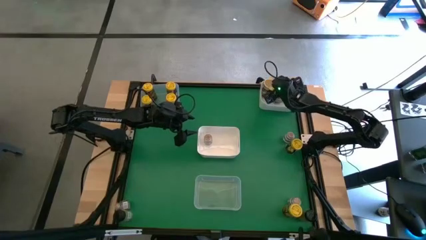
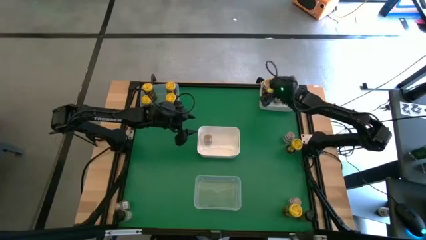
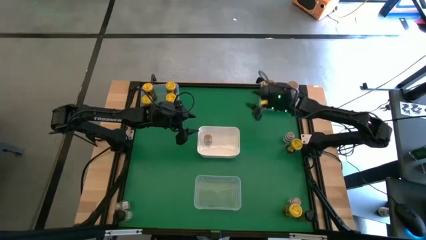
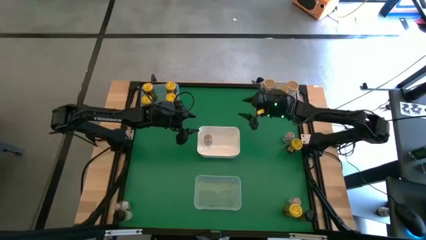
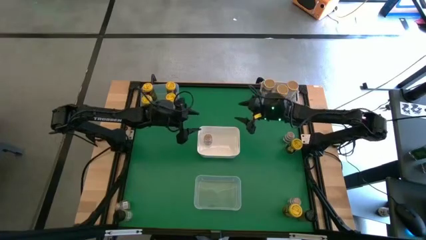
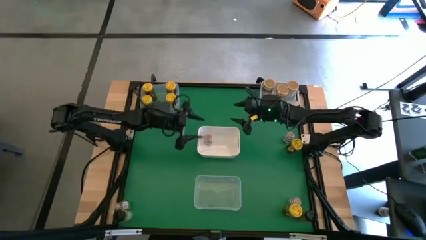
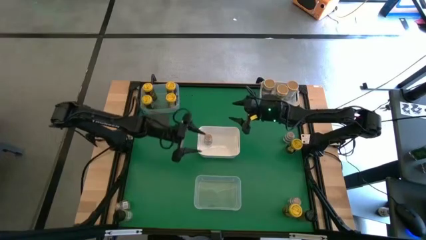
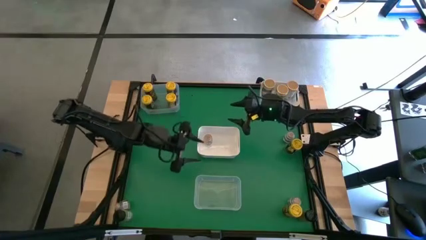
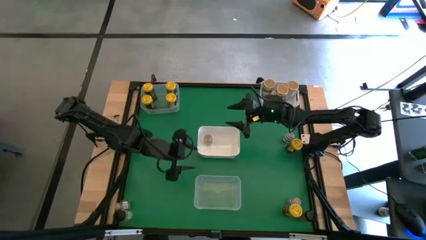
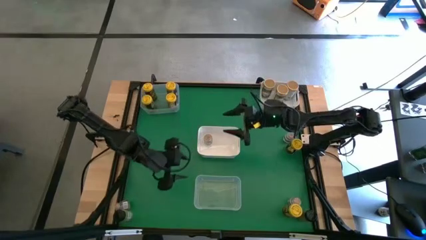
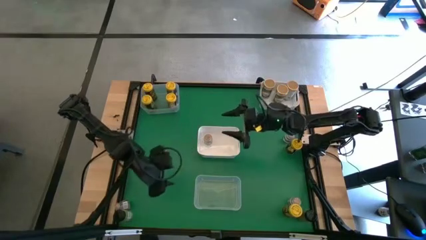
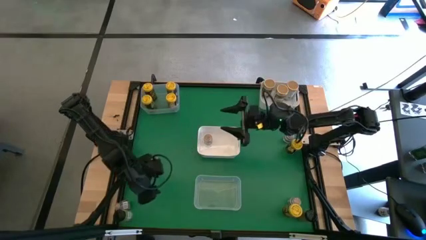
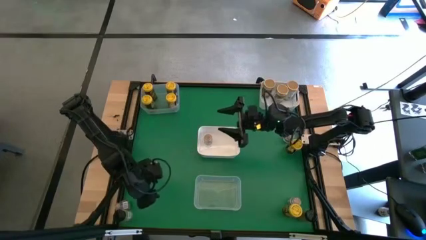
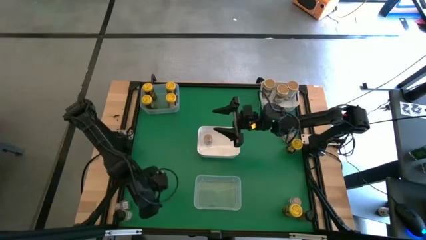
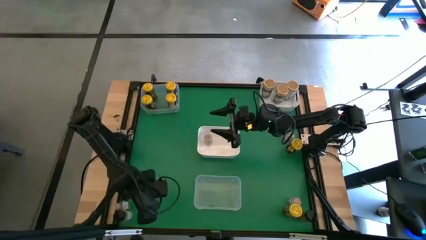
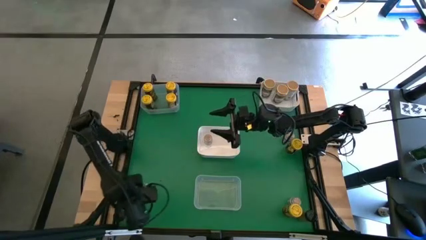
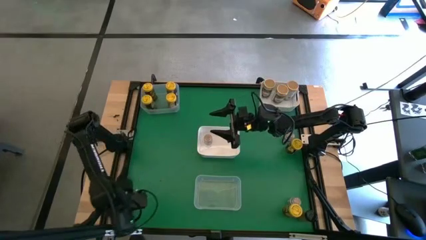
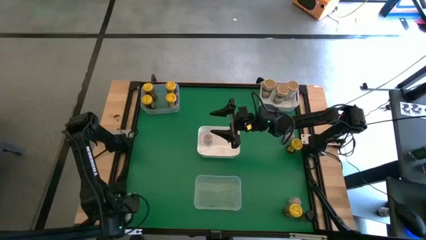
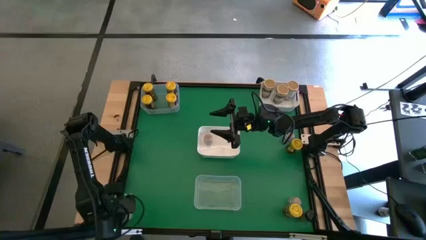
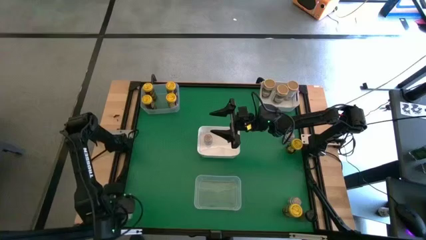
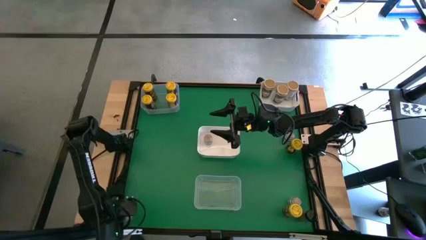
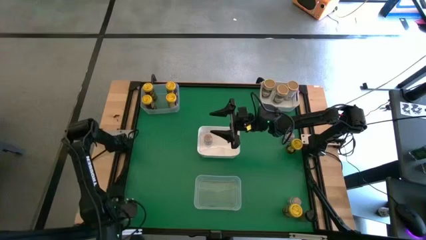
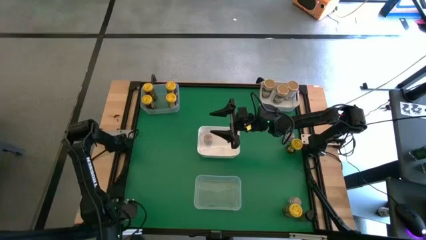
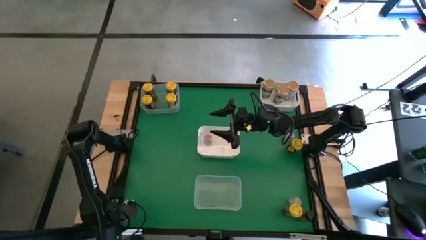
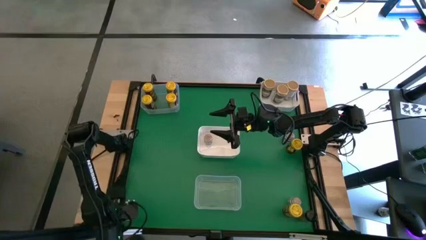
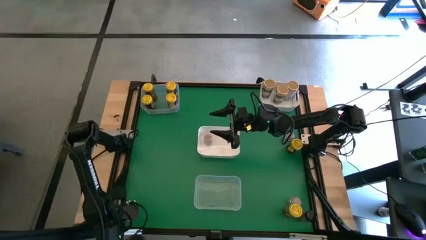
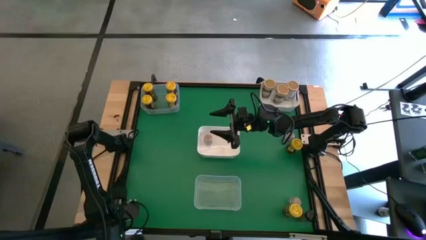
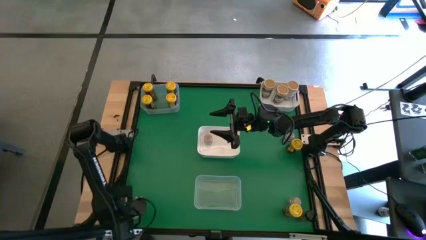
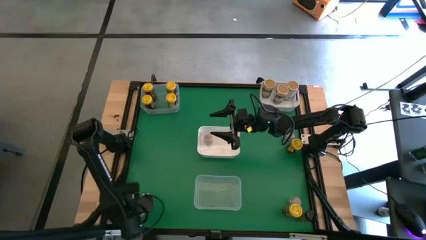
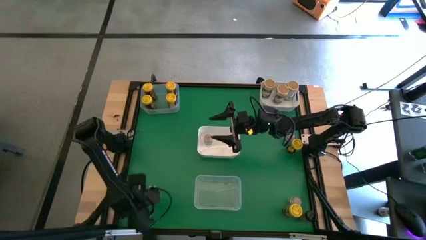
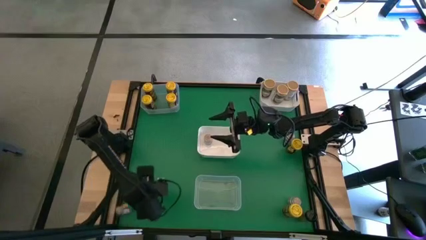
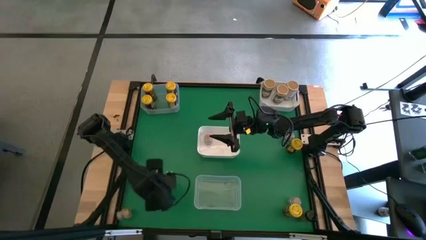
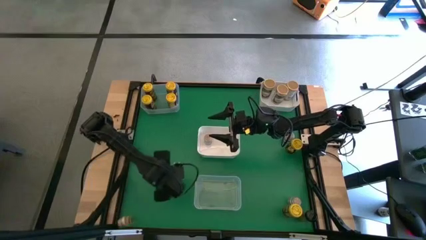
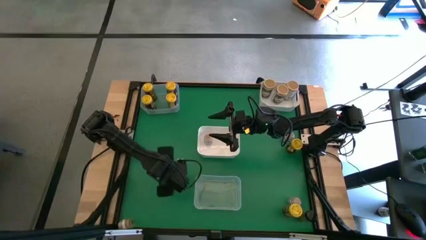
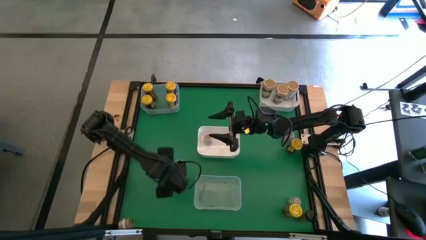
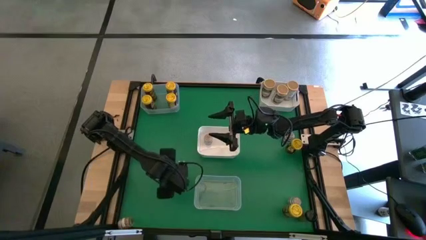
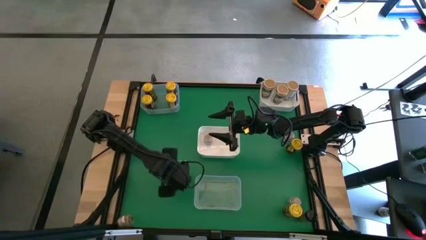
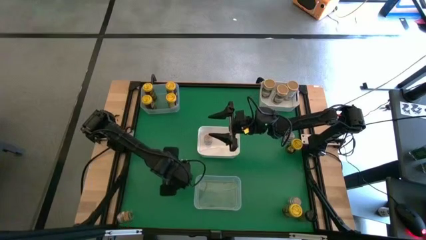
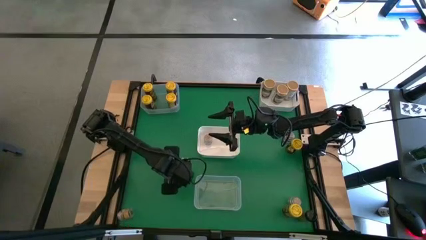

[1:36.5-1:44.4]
Task: Sort spices by type
Move the left black seasoning bottle to the center table

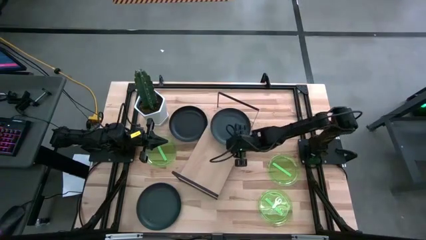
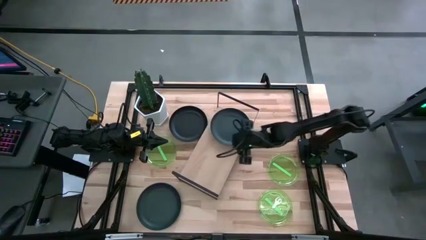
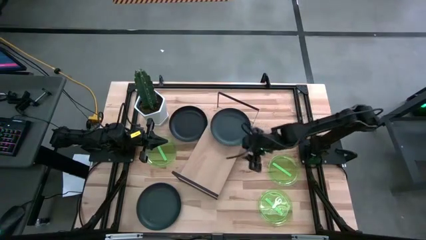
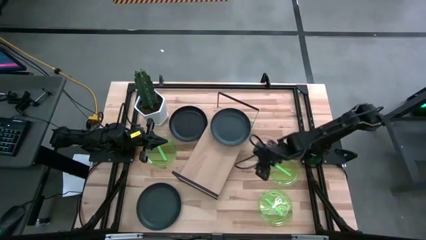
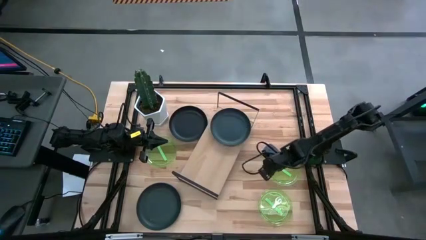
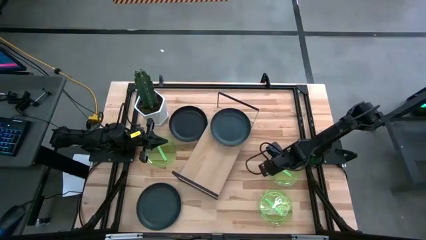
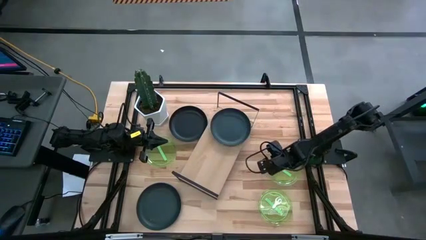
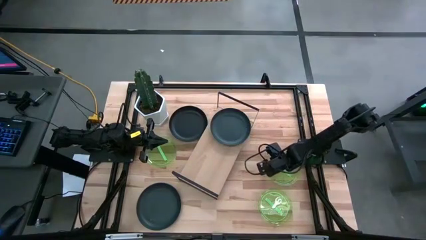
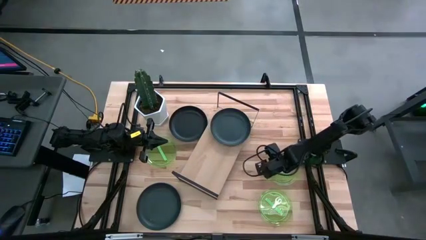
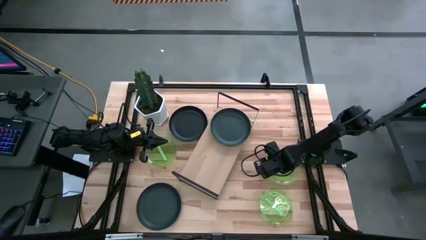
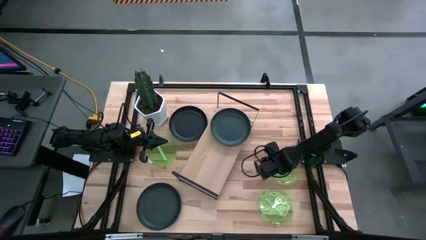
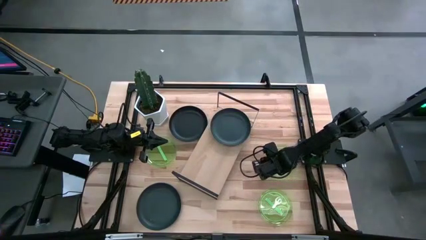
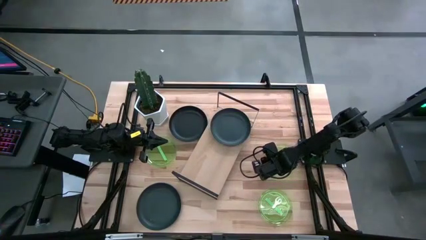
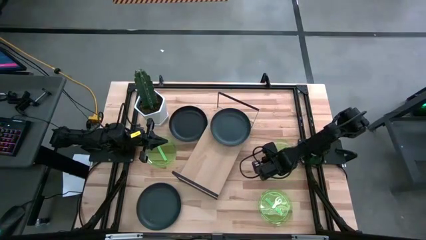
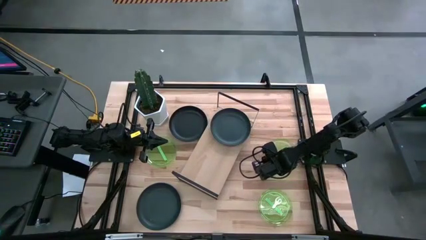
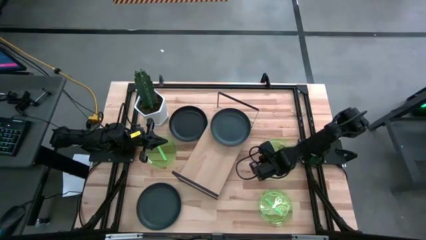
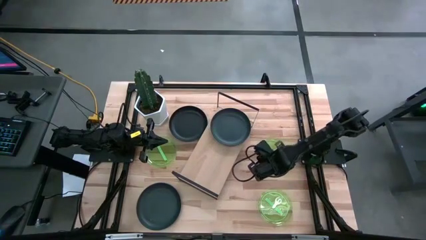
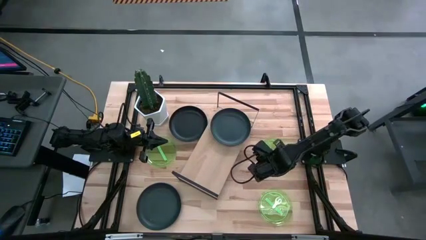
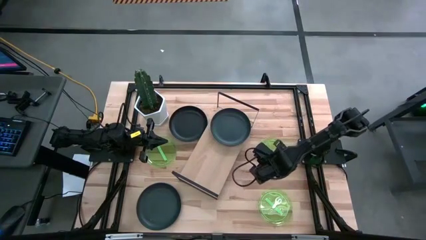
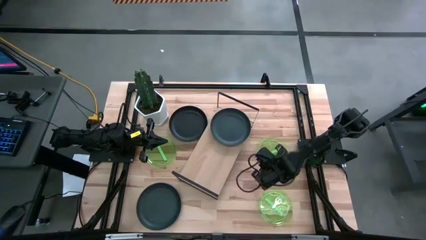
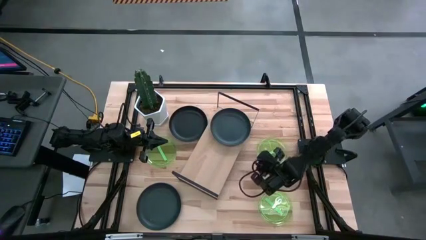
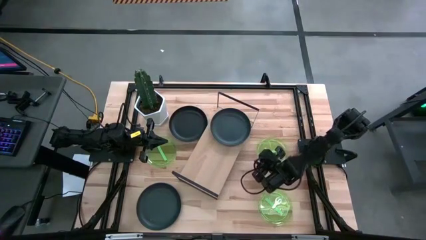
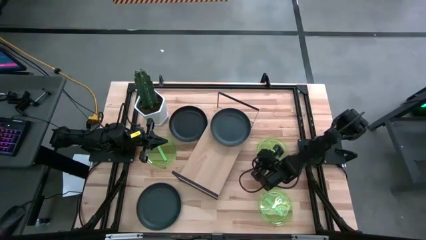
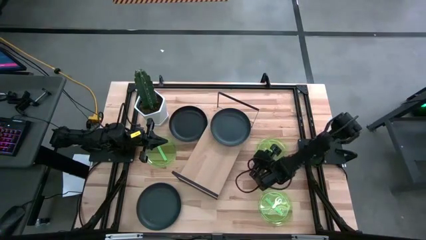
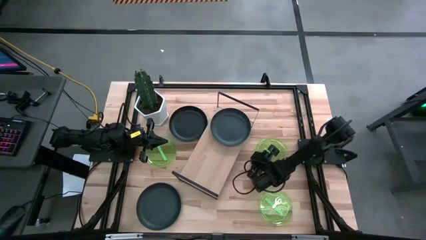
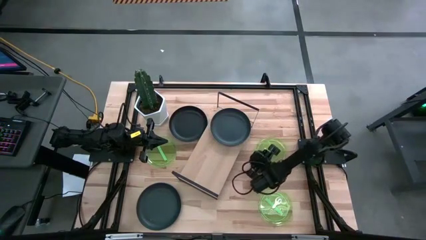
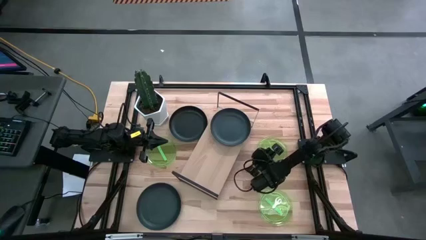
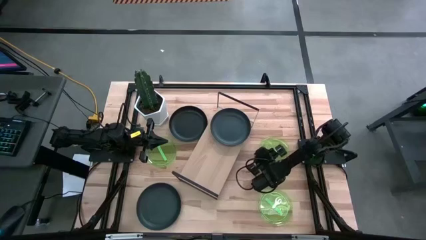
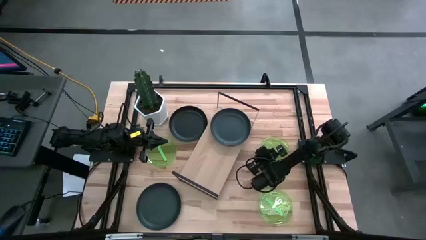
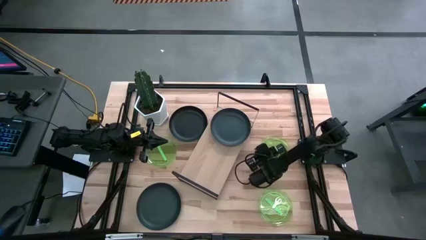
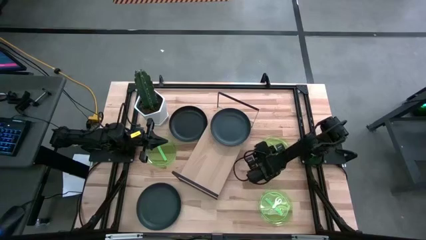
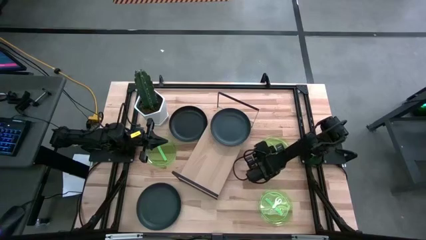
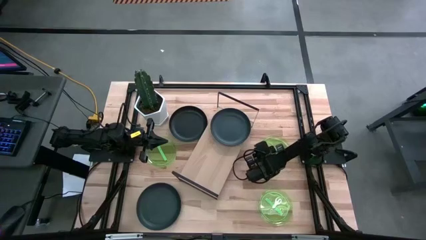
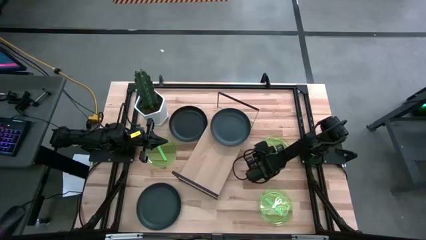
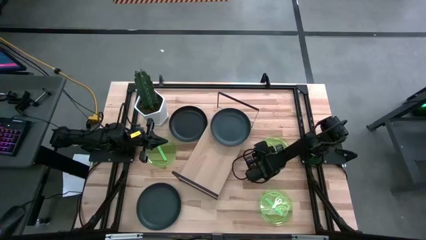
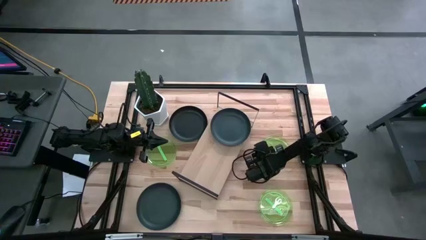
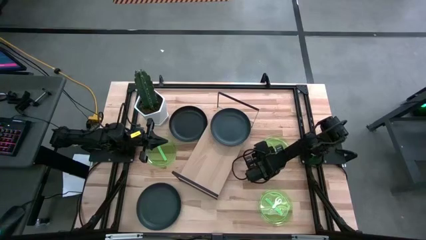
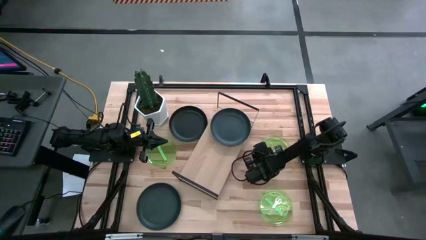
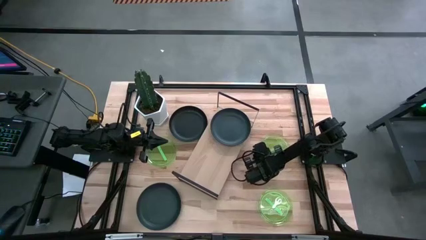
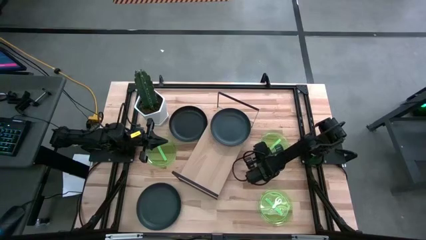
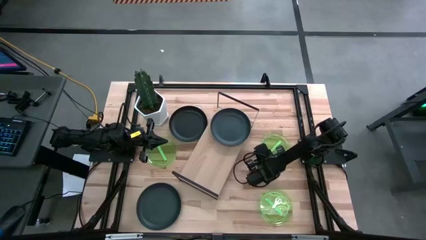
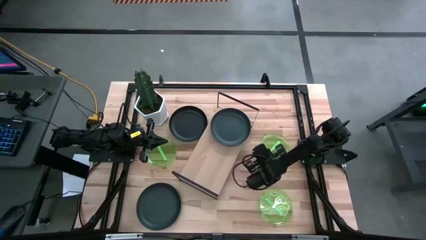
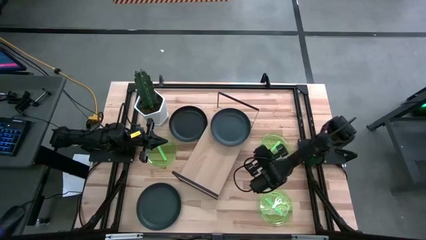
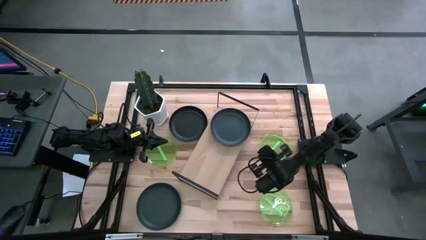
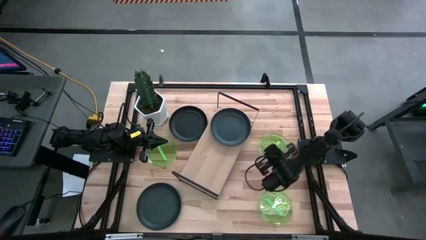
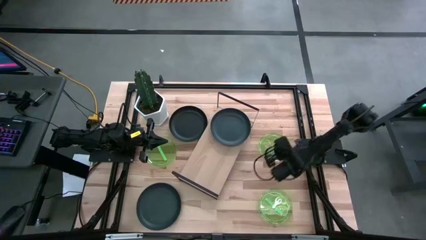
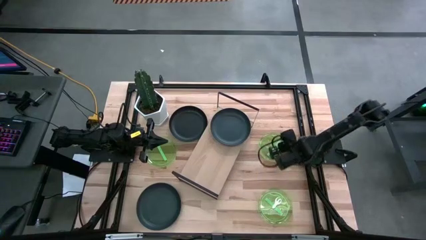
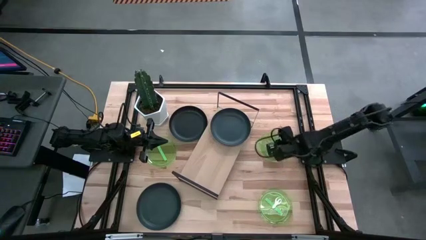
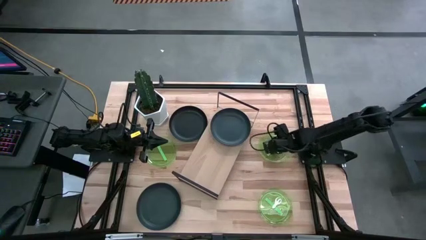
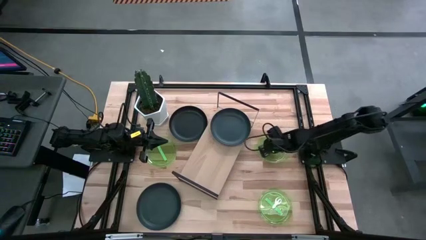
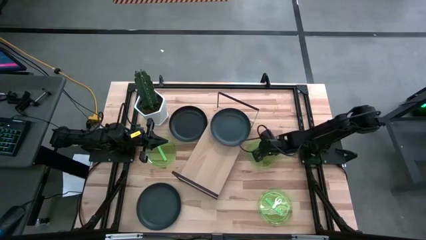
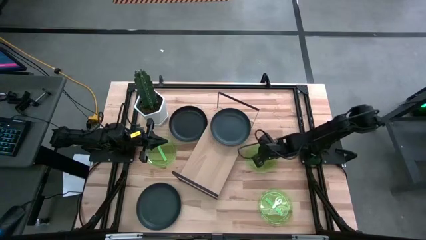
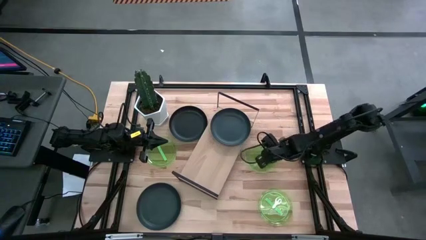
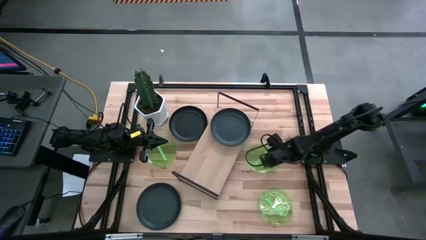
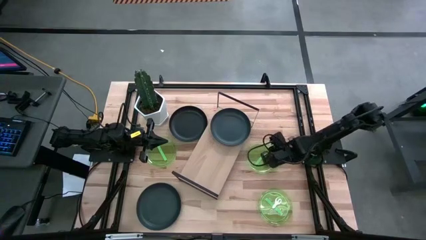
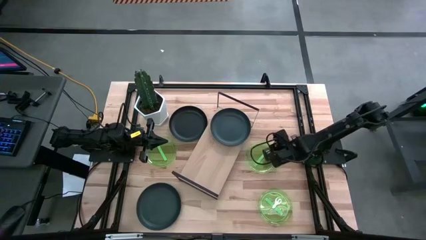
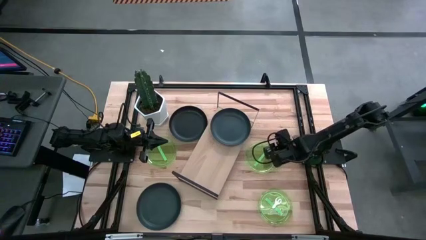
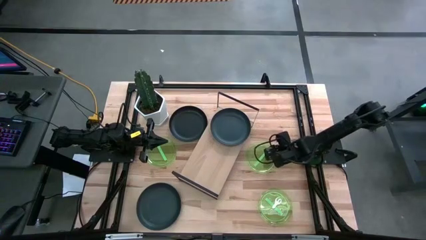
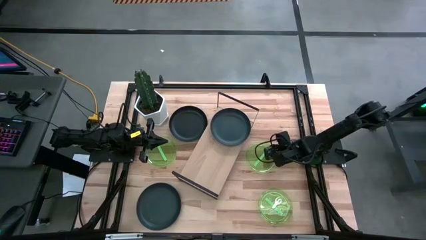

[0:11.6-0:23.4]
Task: Place and stack plates onto a shelf
Put the top right green plate on the shelf
